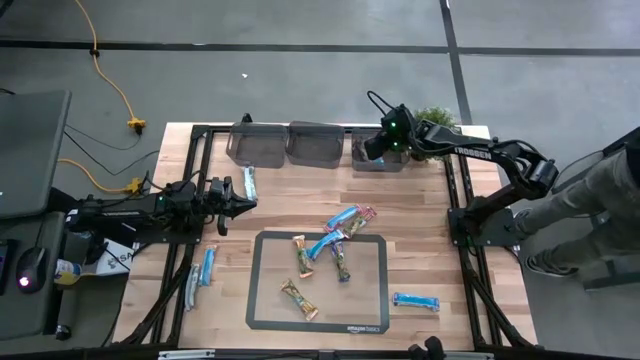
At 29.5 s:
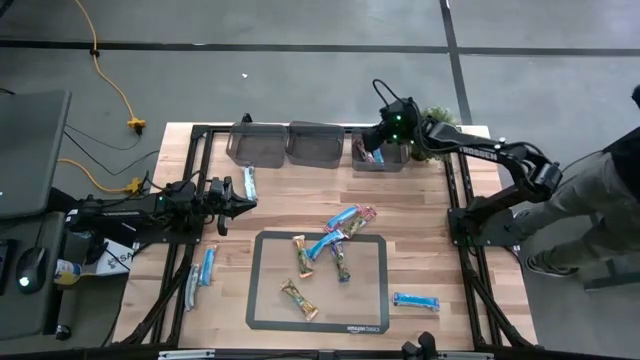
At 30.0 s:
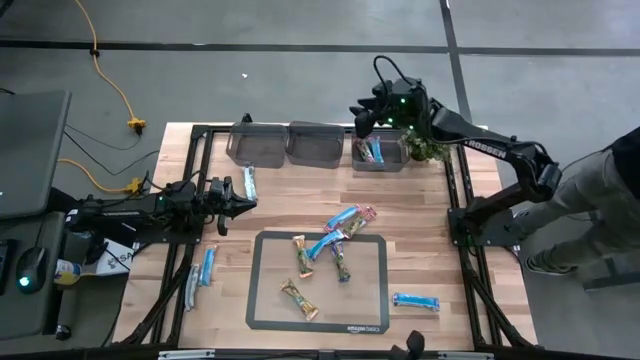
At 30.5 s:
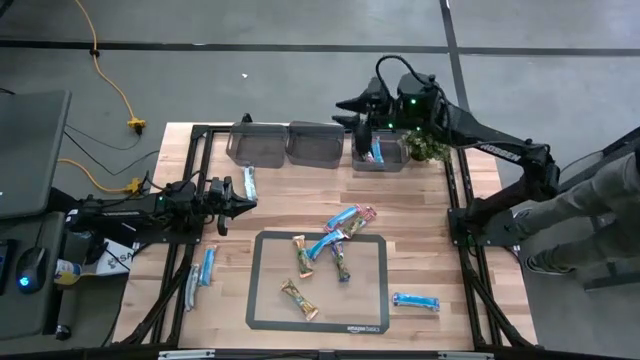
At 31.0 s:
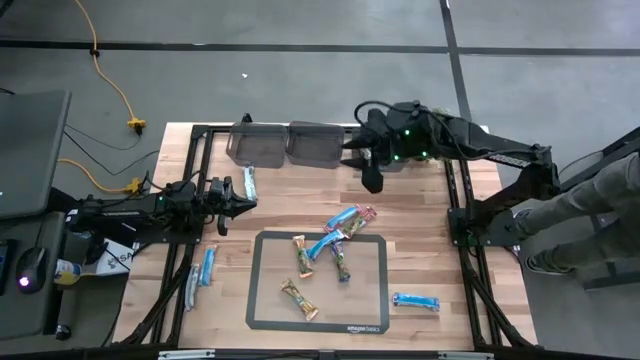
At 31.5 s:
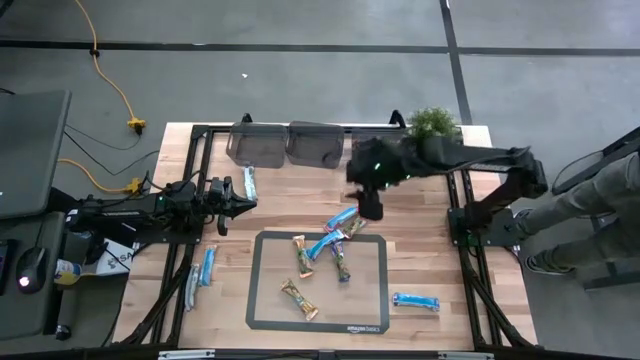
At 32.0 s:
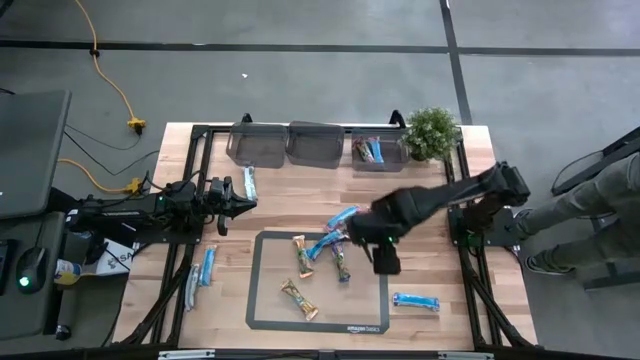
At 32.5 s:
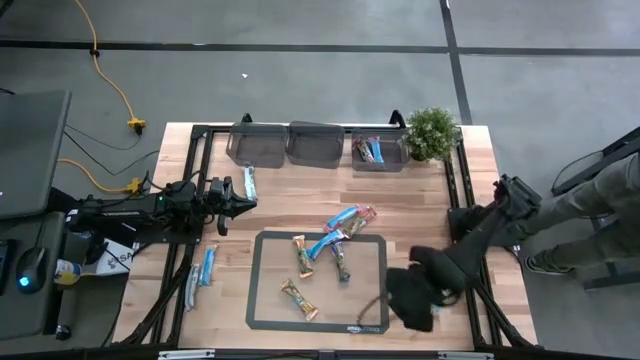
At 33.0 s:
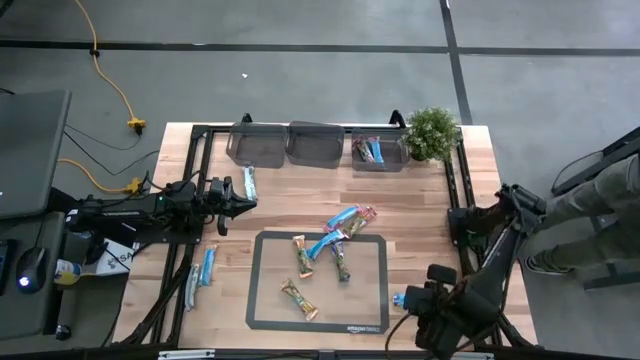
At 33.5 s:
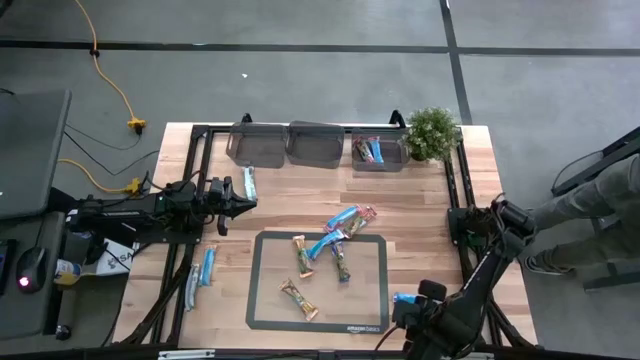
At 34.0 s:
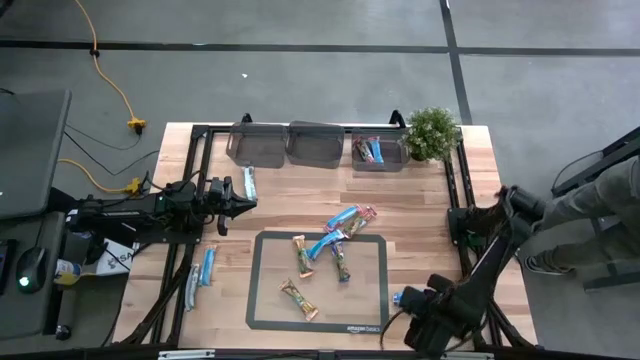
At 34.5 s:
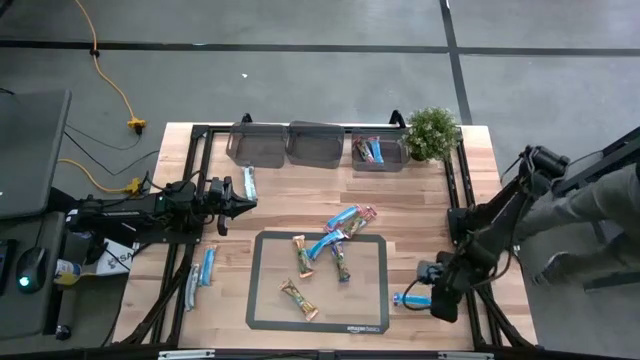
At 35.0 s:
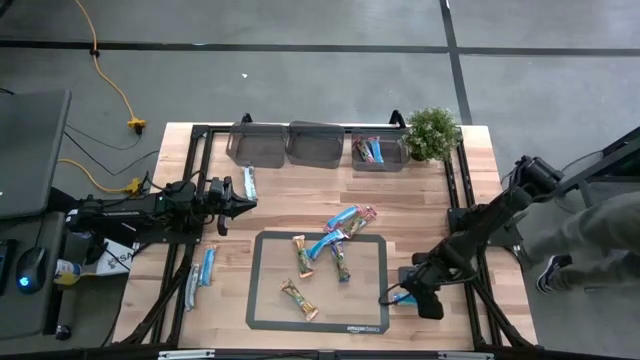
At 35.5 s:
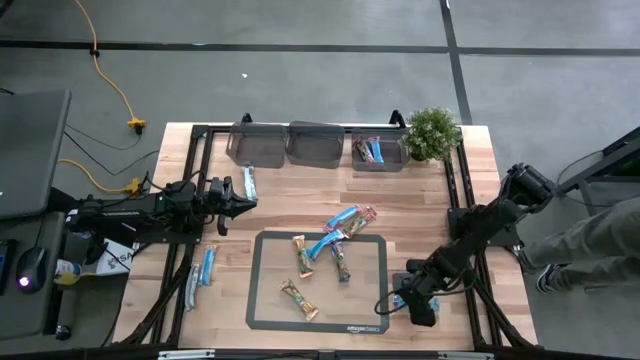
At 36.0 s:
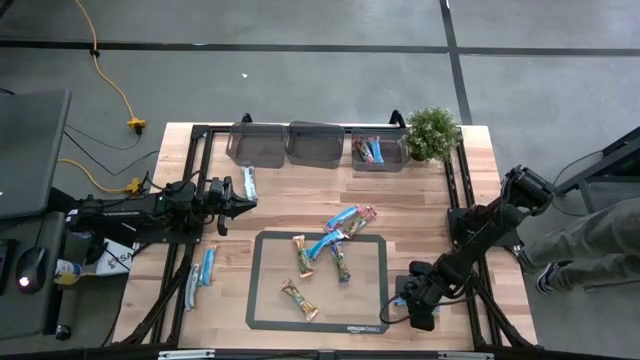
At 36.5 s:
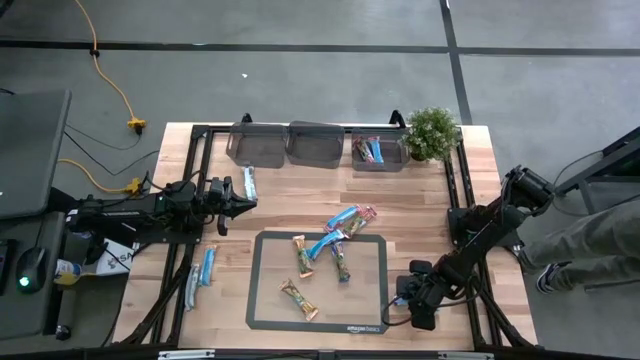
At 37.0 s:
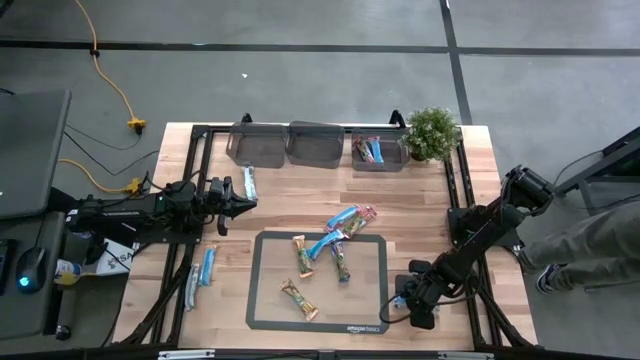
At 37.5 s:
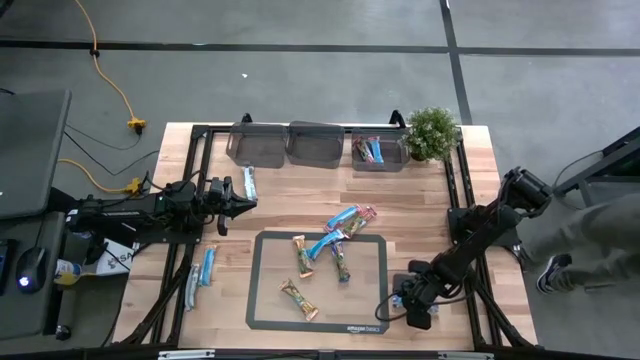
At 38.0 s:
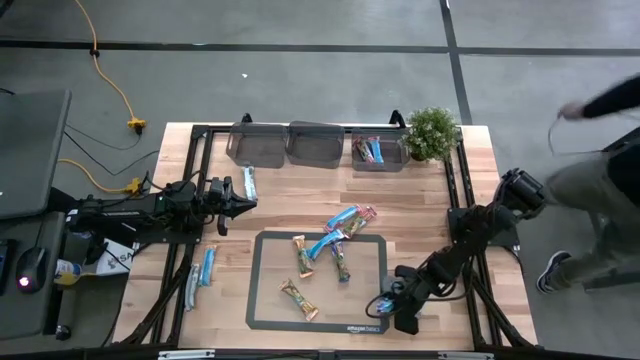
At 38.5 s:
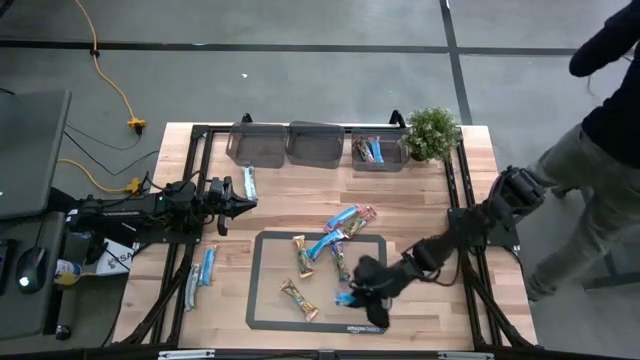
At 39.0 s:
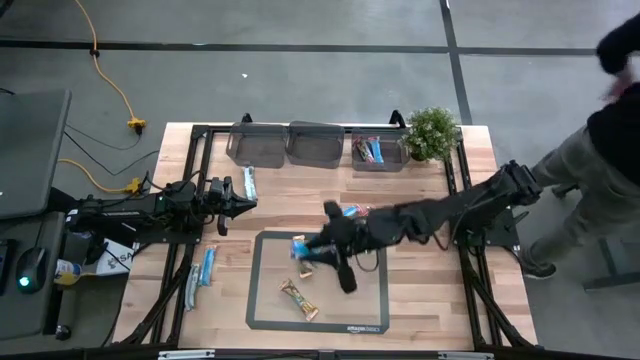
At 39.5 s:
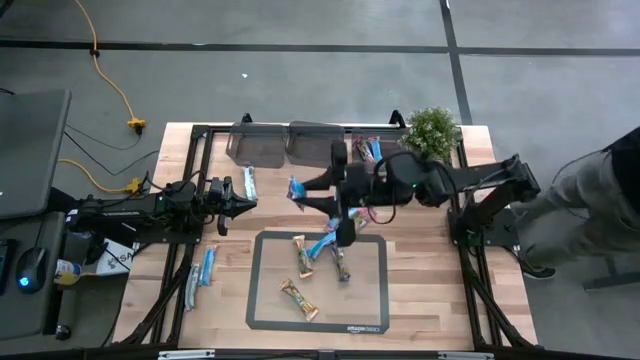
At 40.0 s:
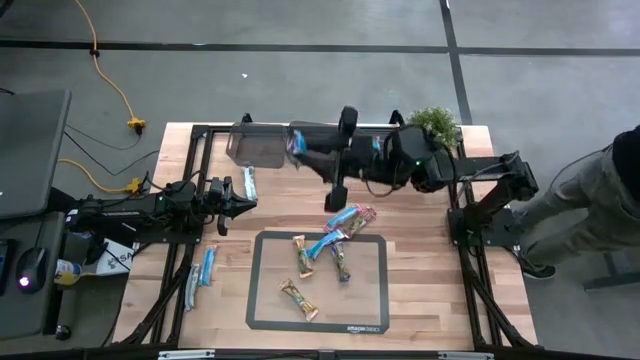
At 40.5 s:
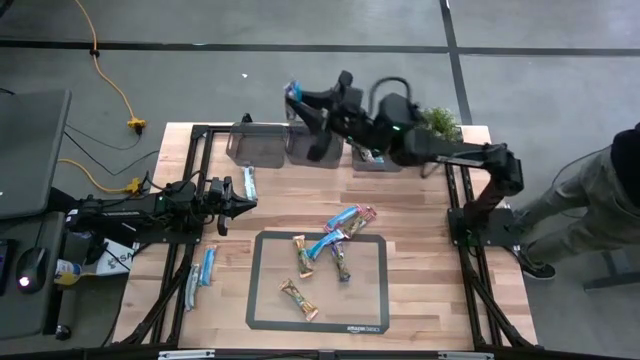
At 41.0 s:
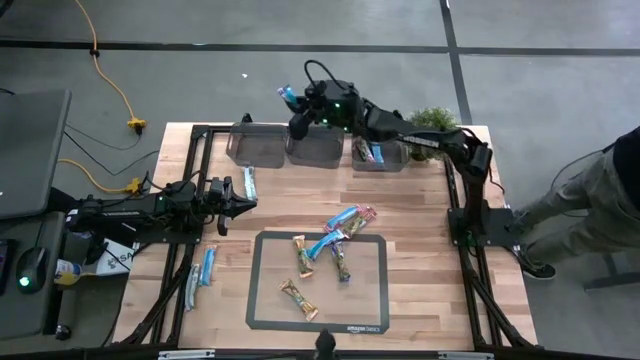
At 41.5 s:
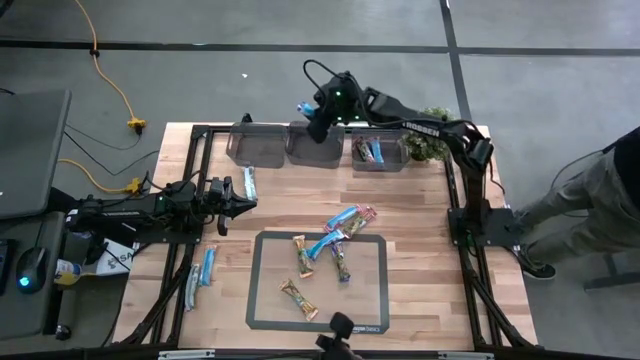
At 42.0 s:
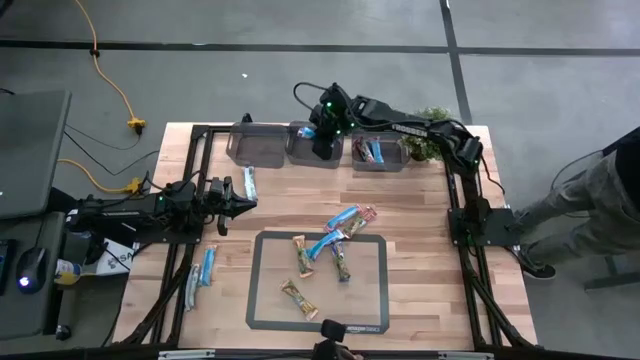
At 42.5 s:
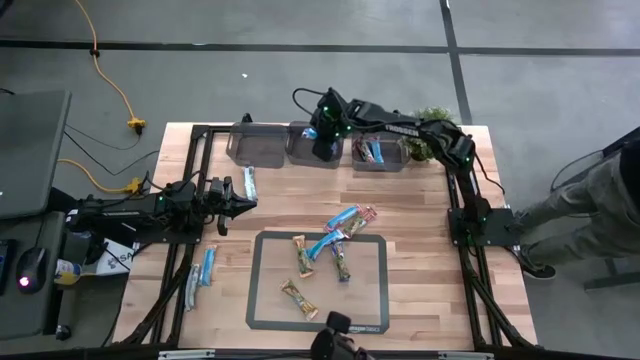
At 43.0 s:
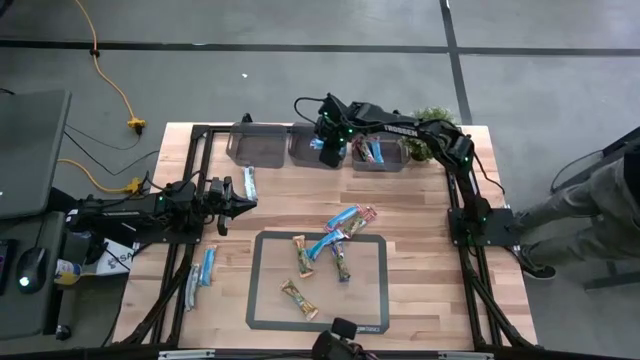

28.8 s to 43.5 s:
Task: Pick and place Granola Bars by type
Put the blue granola bar into the middle black bin
